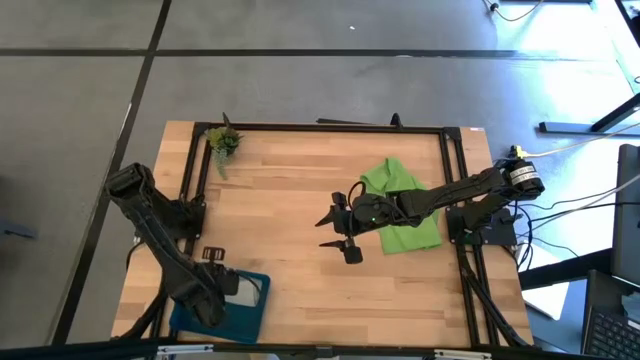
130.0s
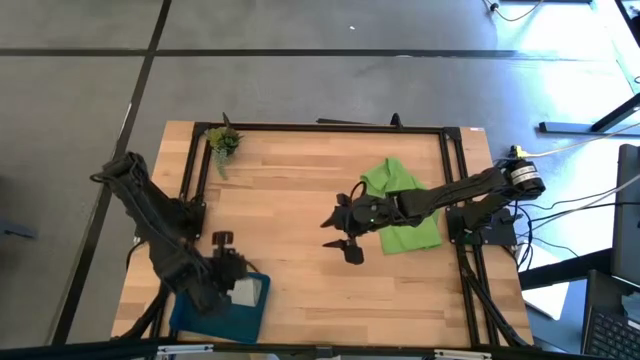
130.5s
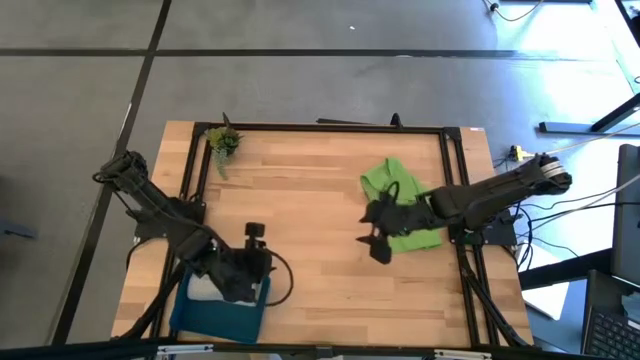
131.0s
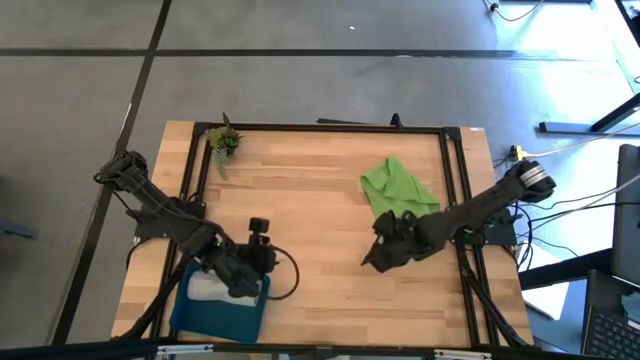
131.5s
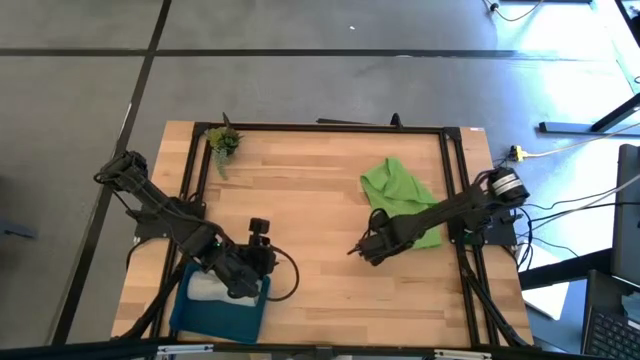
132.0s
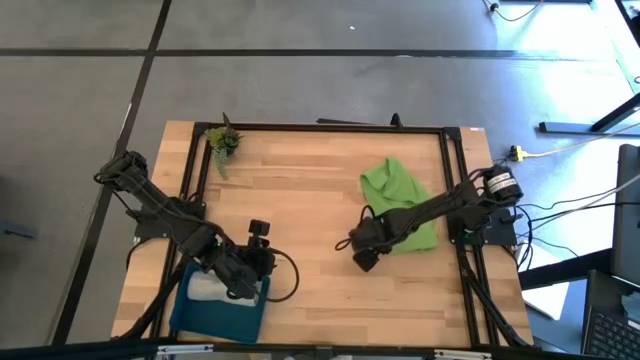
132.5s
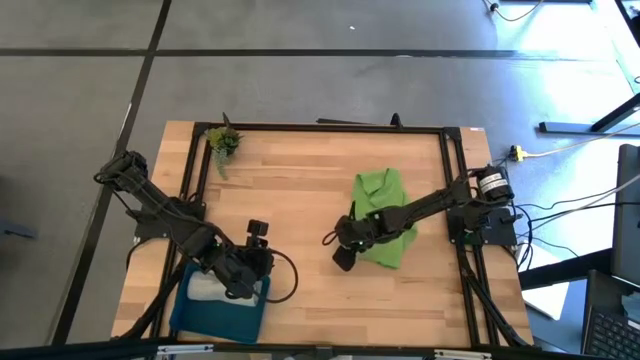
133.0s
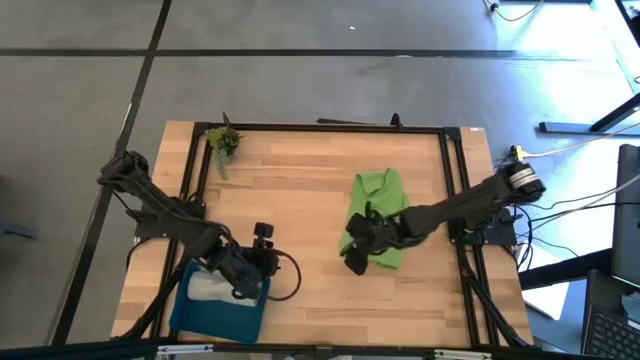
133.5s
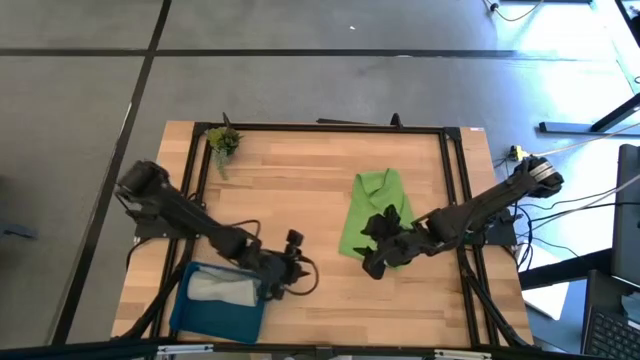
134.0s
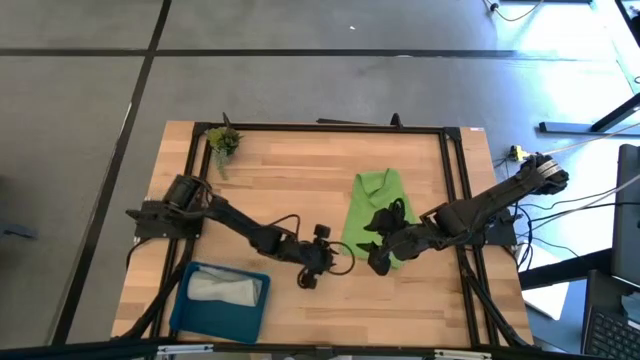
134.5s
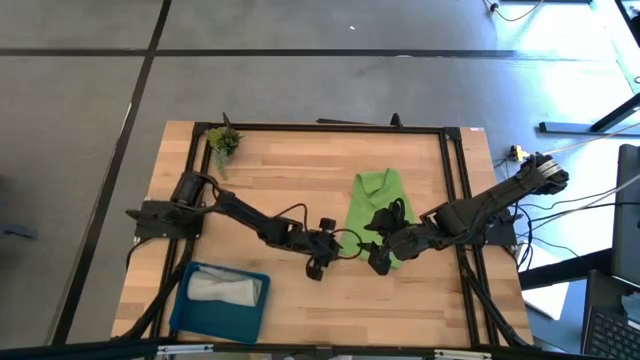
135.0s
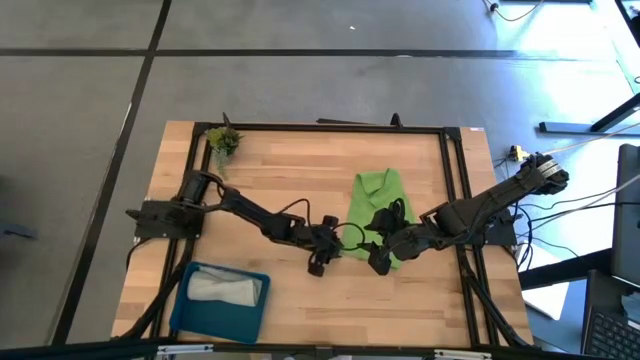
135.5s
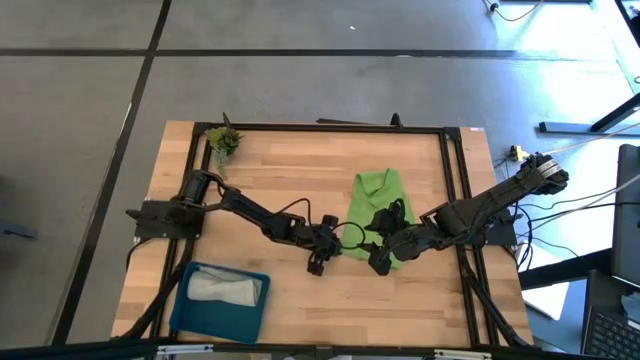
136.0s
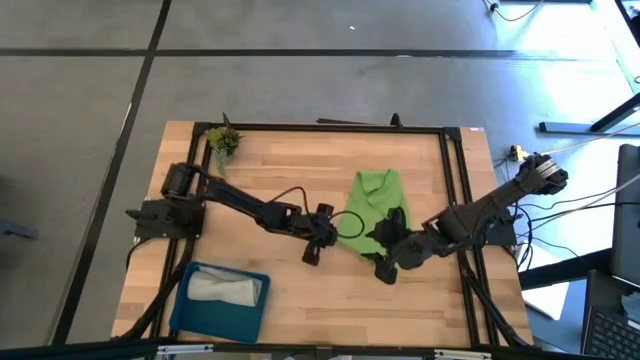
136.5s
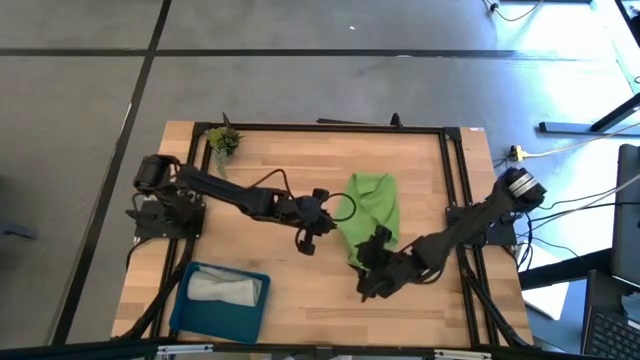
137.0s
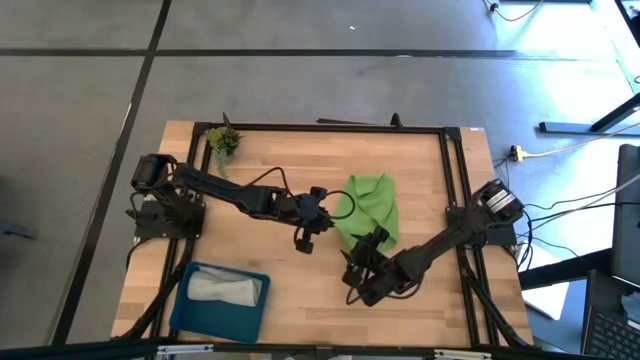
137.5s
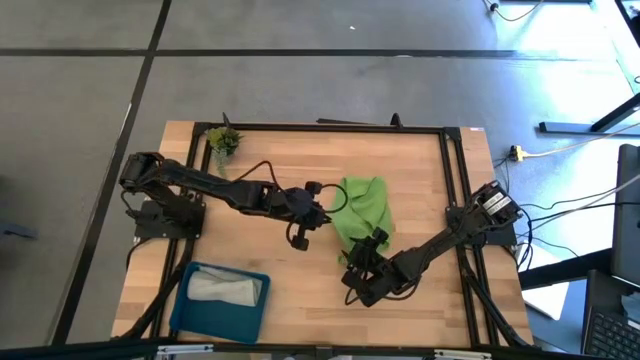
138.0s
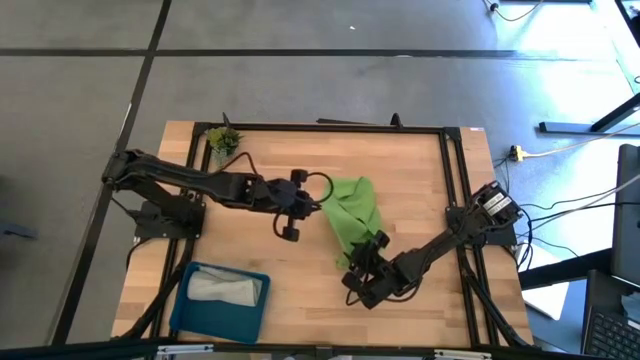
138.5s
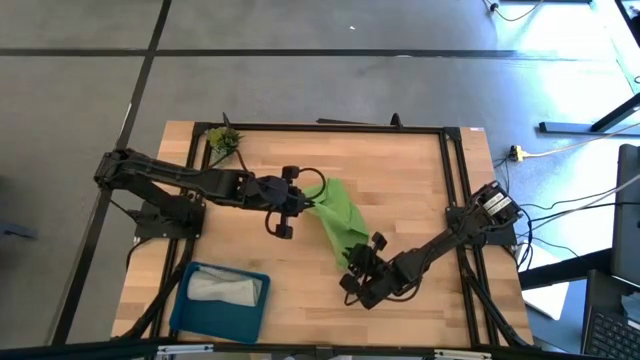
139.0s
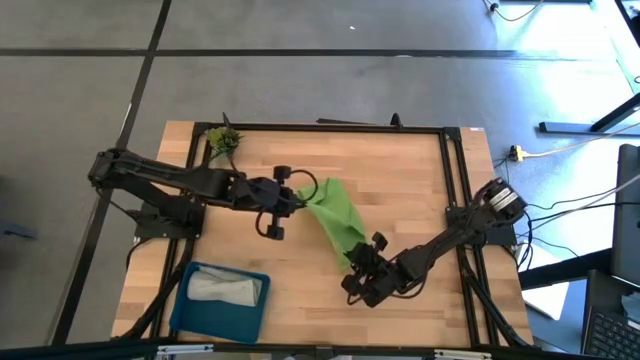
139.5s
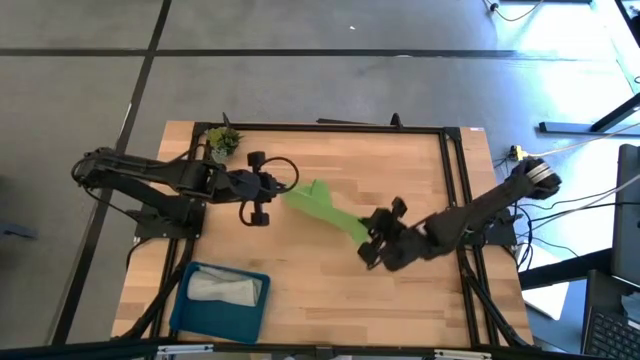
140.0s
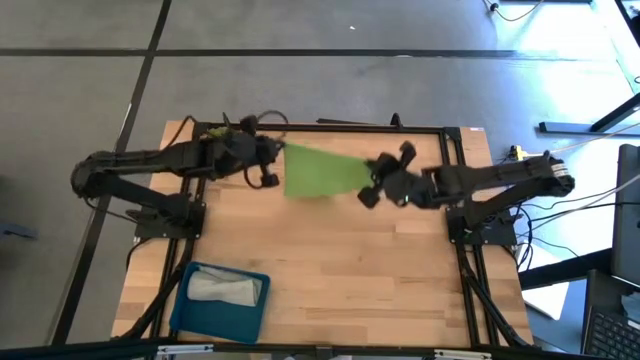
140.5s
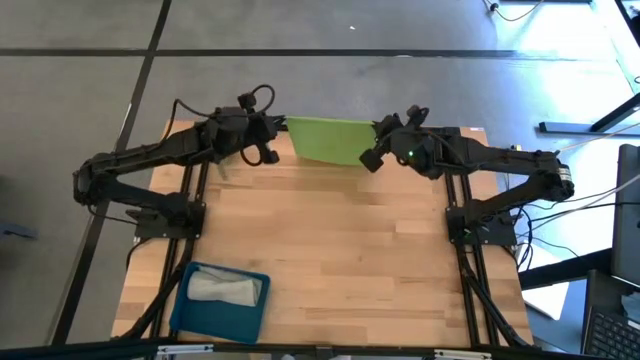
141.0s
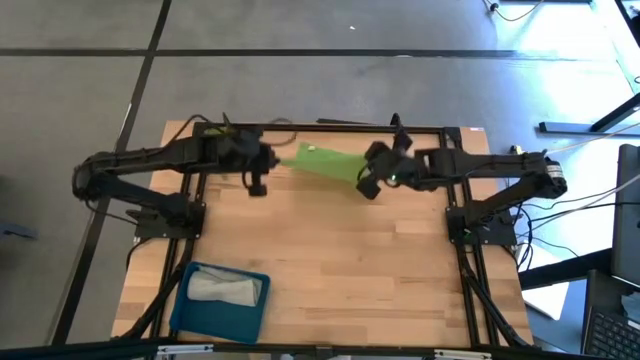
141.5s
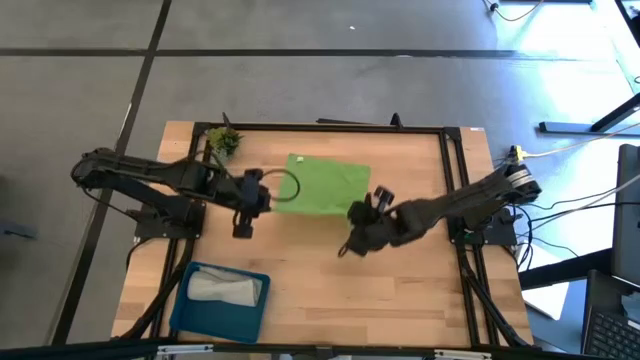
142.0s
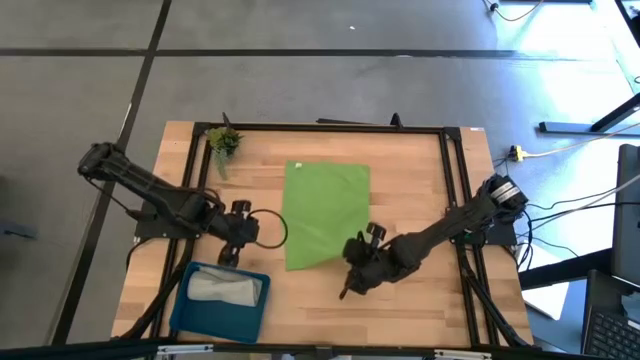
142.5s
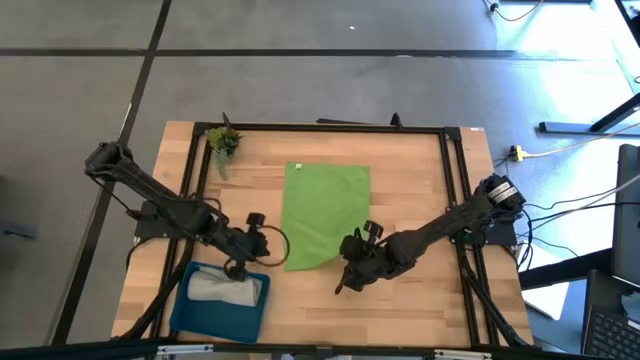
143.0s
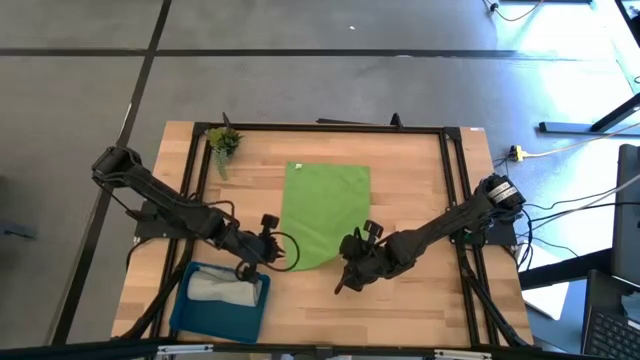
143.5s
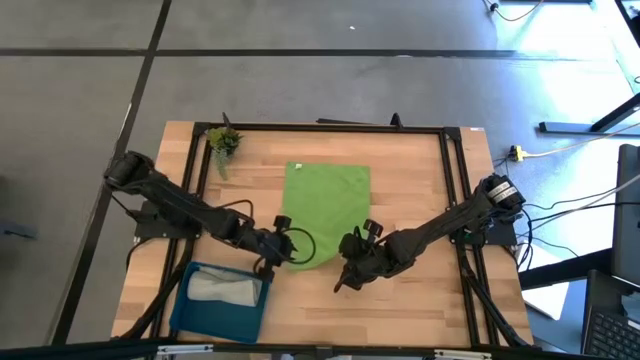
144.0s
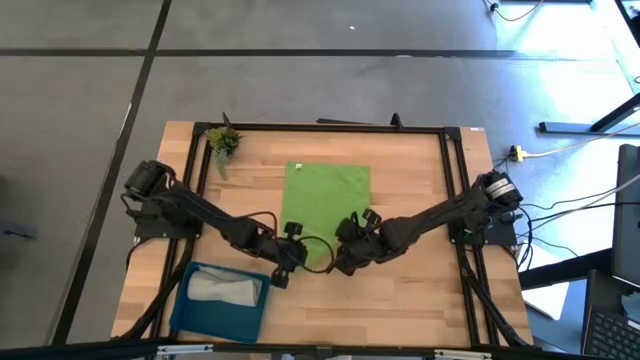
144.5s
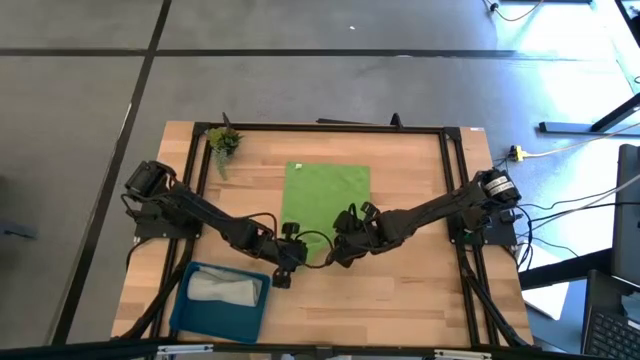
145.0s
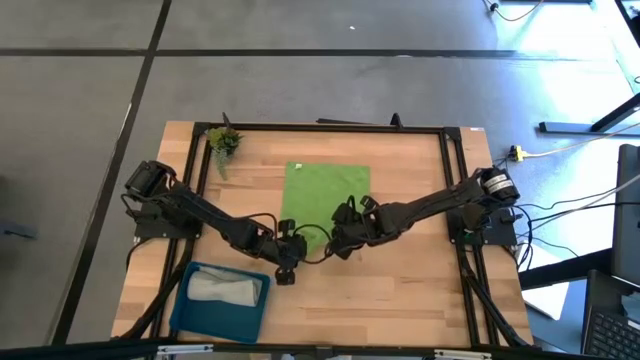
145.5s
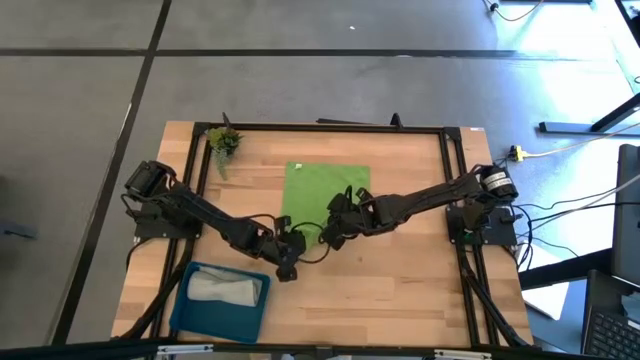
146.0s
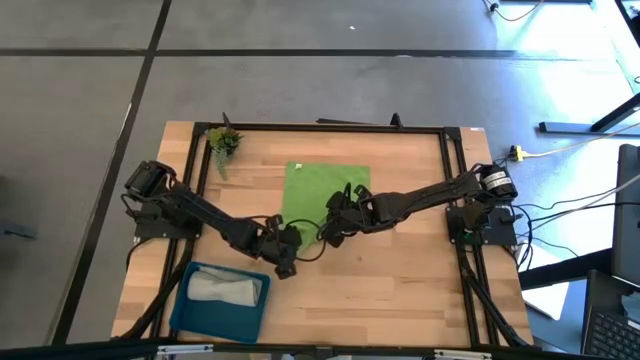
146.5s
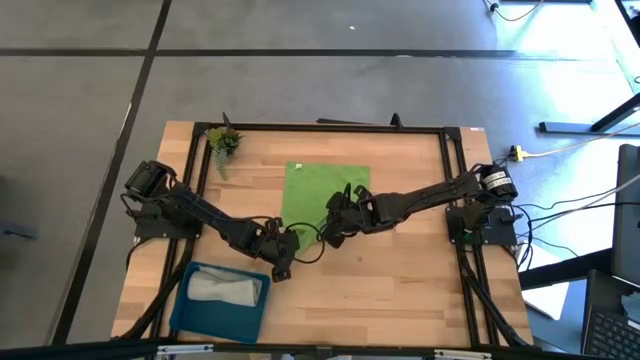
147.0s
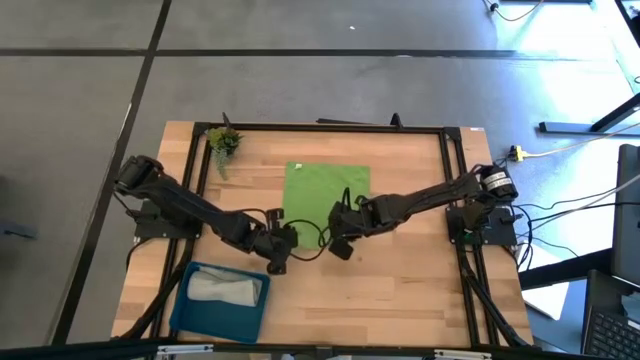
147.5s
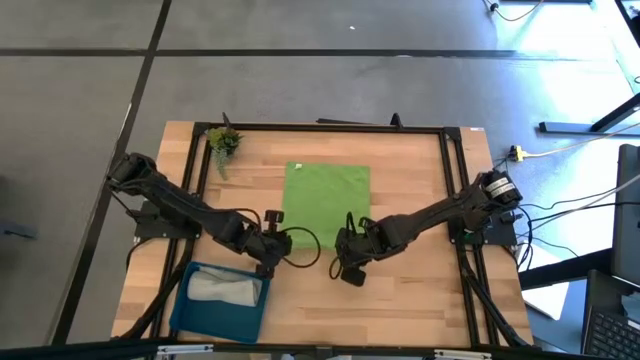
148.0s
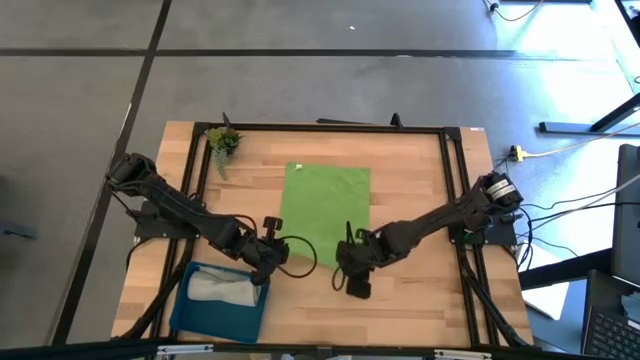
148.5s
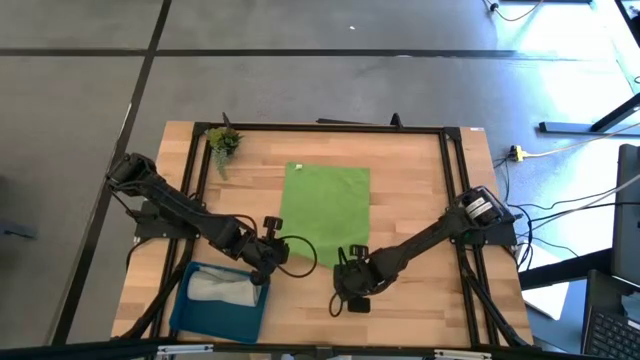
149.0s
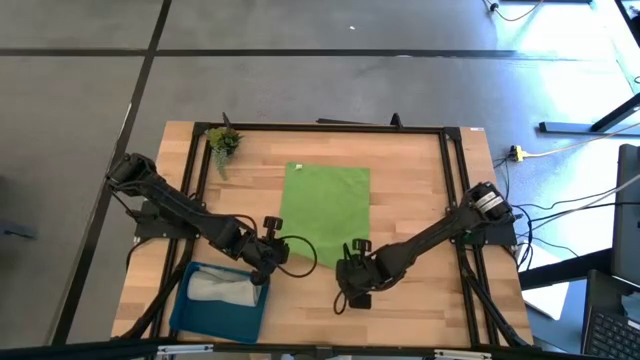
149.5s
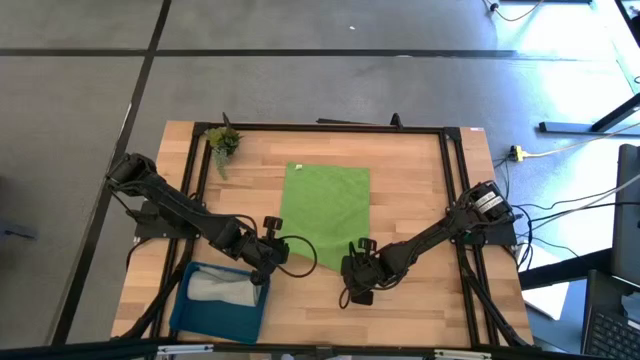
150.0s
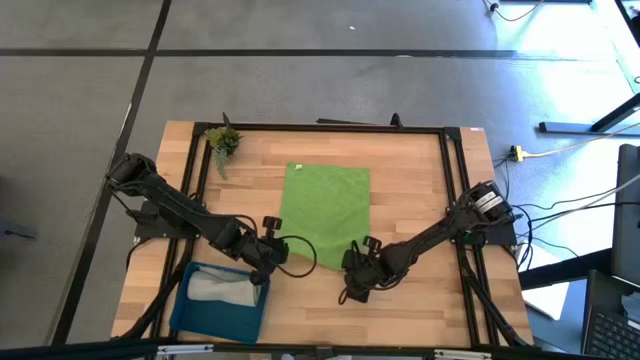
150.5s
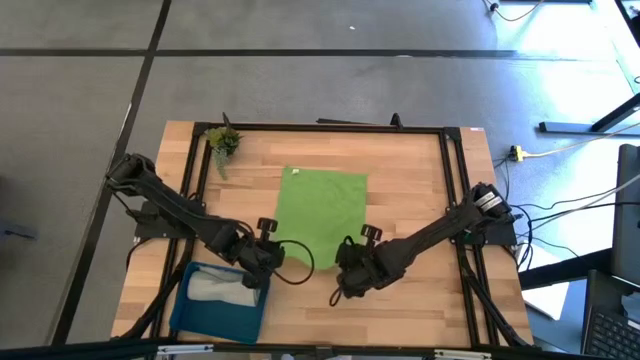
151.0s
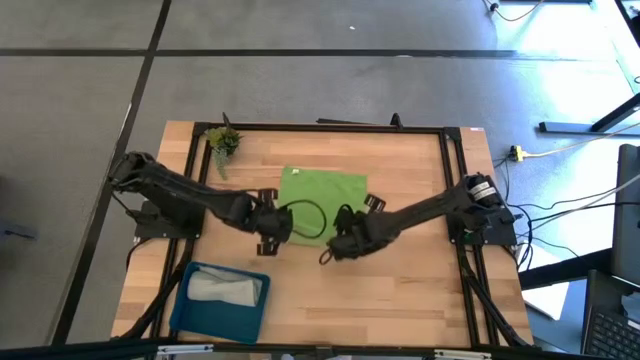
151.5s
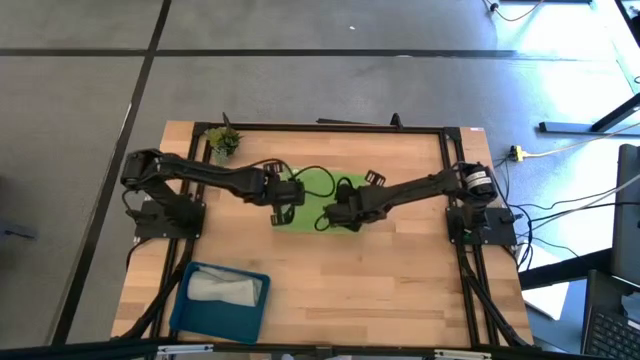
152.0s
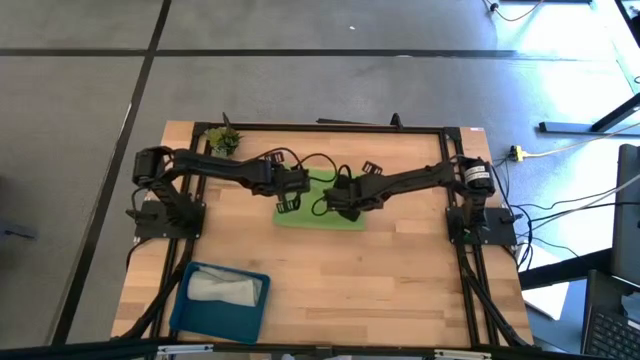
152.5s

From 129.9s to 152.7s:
Task: Fold microfiber towels
Fold the green microfiber cloth
